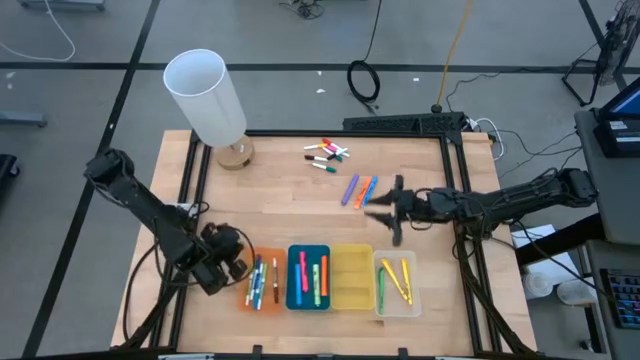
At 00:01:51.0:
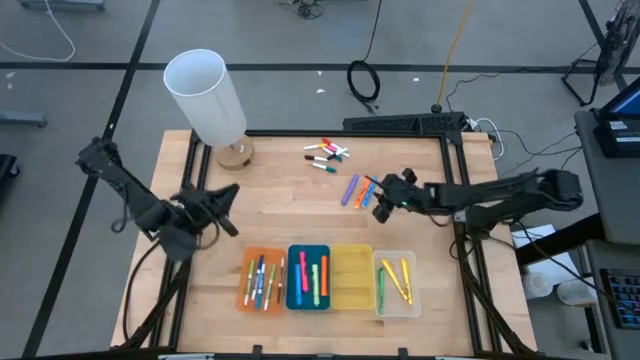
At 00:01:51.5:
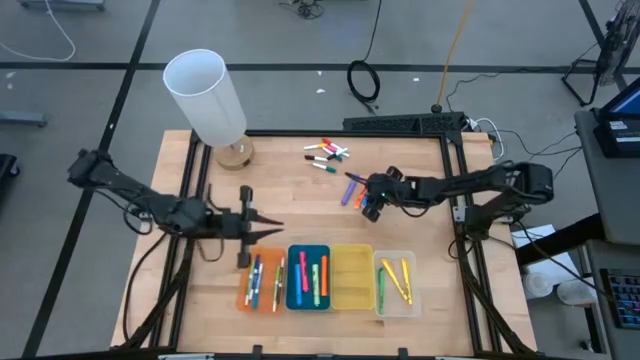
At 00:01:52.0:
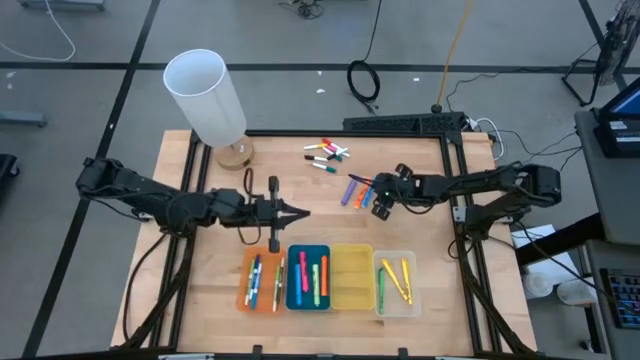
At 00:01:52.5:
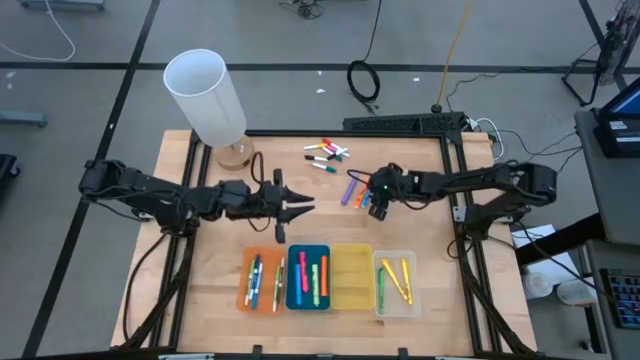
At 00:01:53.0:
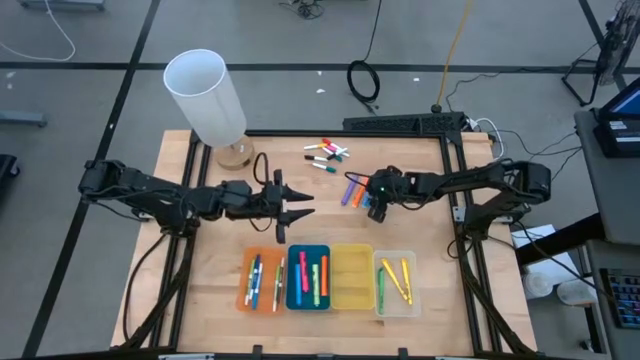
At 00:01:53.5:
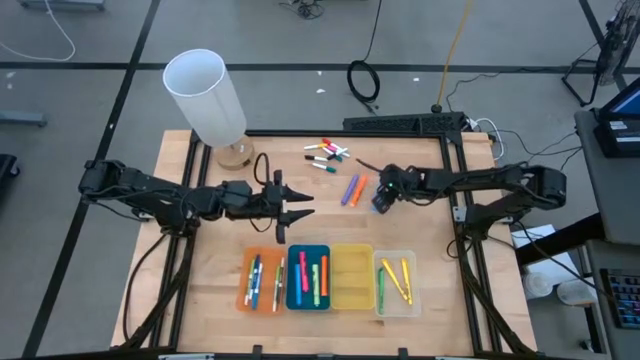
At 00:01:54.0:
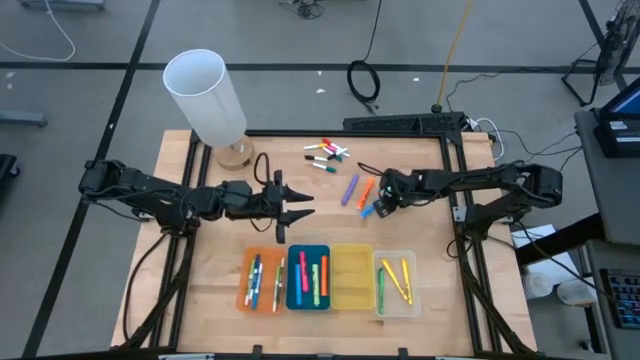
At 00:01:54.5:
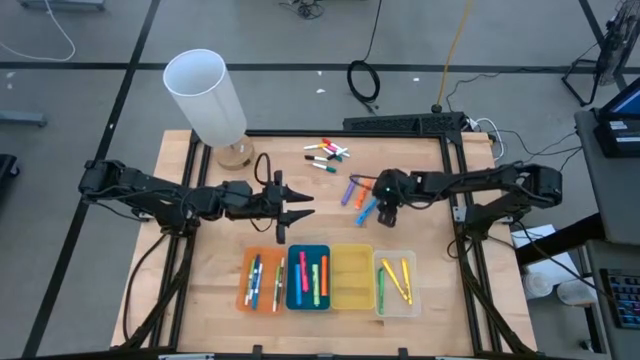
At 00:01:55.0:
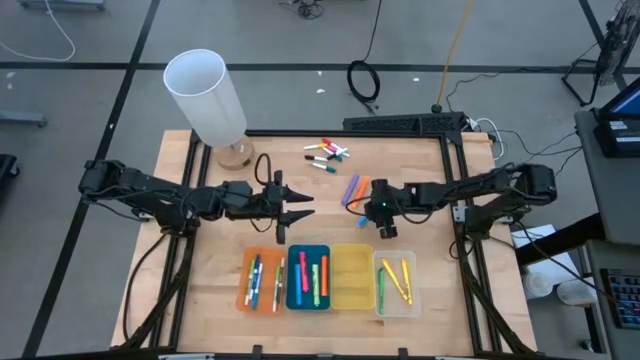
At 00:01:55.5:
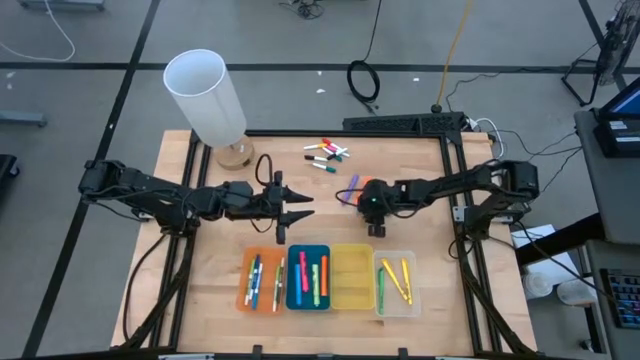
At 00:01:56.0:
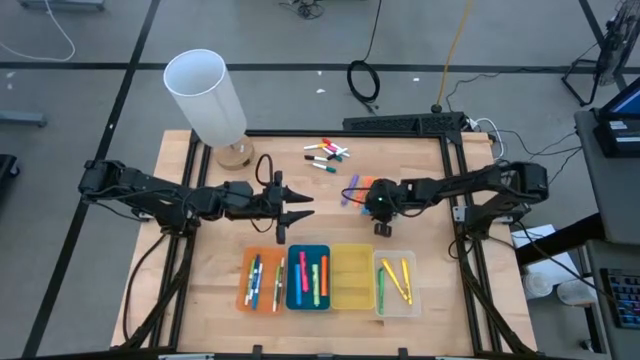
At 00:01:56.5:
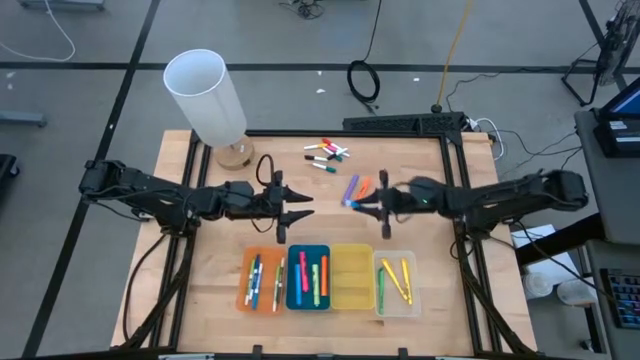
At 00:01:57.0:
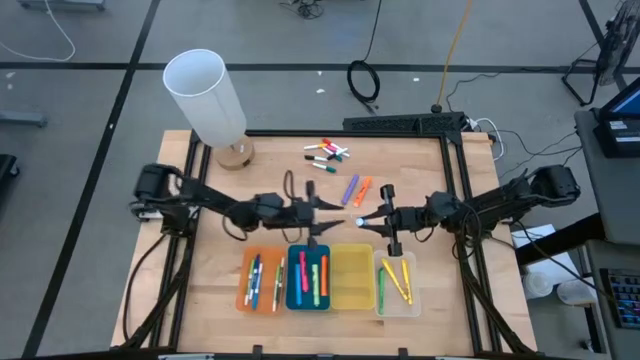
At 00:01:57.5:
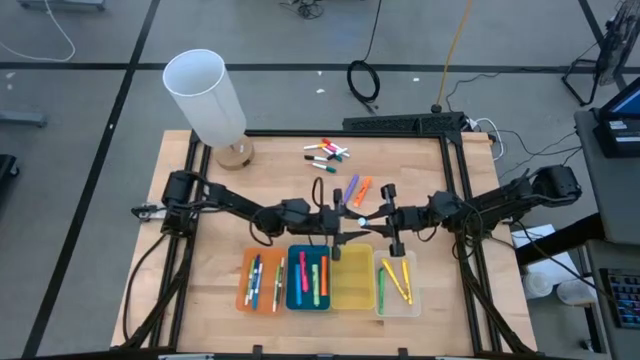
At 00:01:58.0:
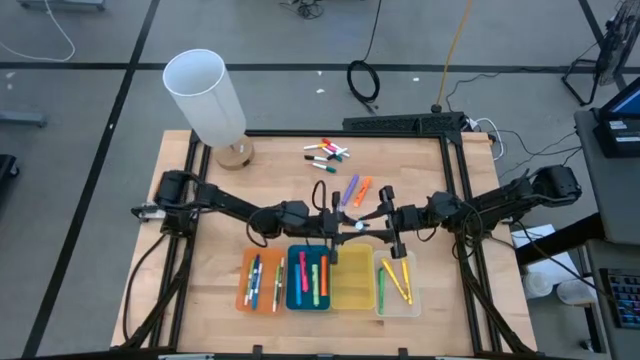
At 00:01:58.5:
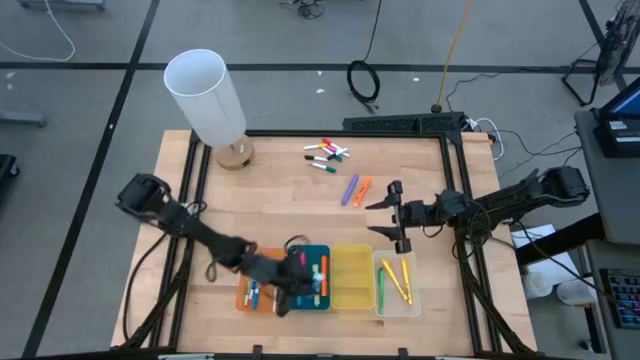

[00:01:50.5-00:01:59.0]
Task: Pick & Place Markers
Put the blue highlighter pen into the blue bin

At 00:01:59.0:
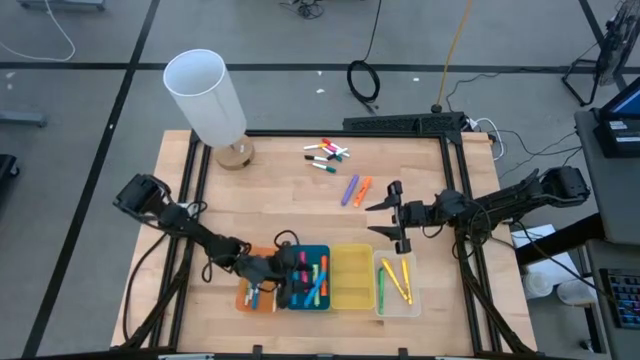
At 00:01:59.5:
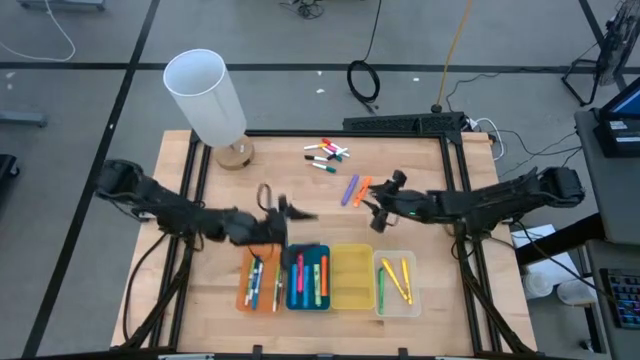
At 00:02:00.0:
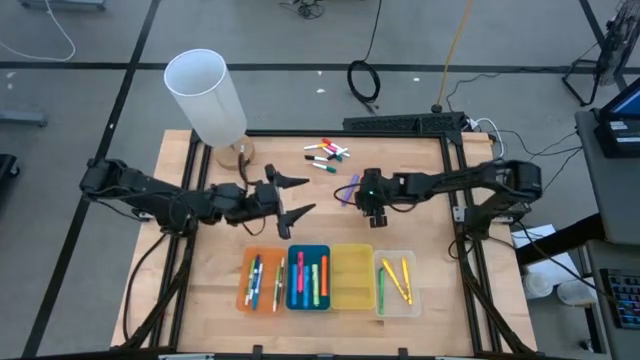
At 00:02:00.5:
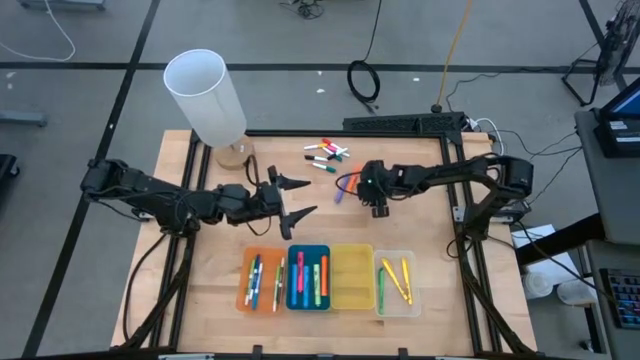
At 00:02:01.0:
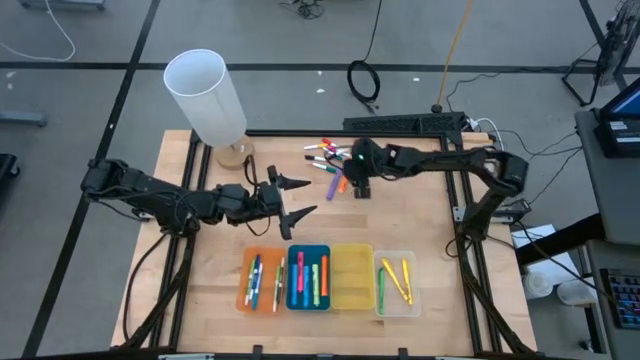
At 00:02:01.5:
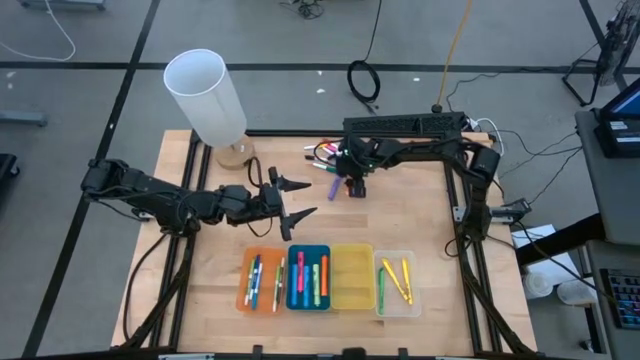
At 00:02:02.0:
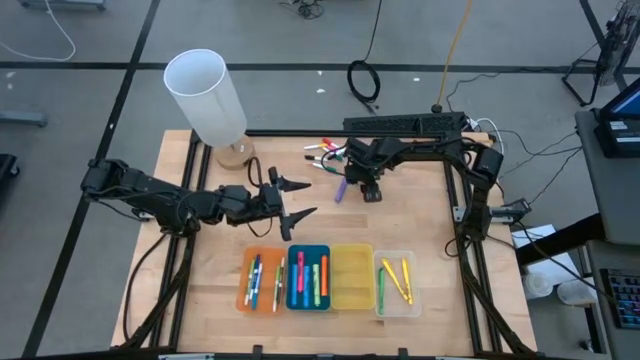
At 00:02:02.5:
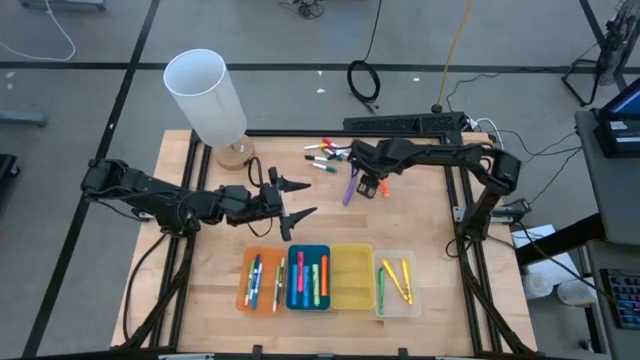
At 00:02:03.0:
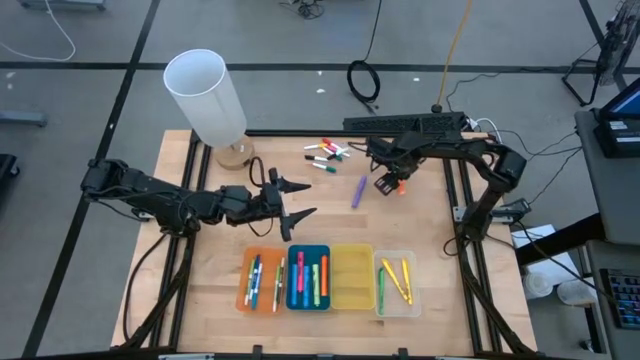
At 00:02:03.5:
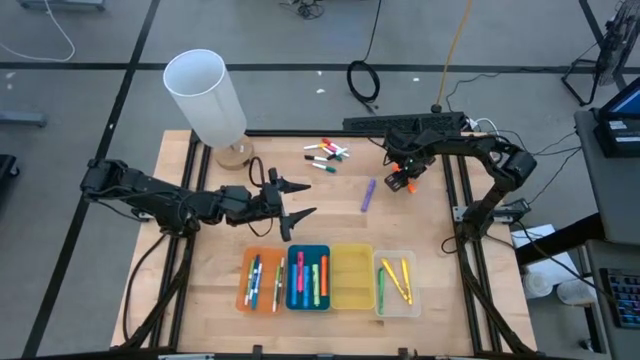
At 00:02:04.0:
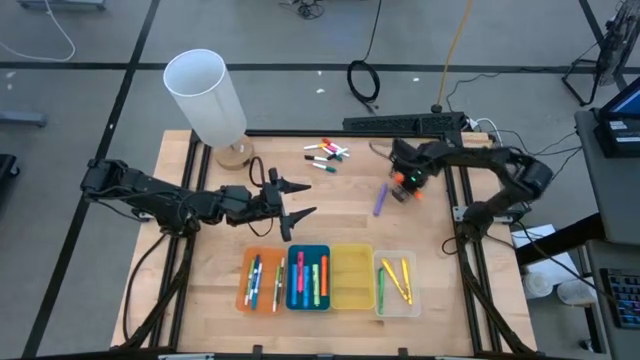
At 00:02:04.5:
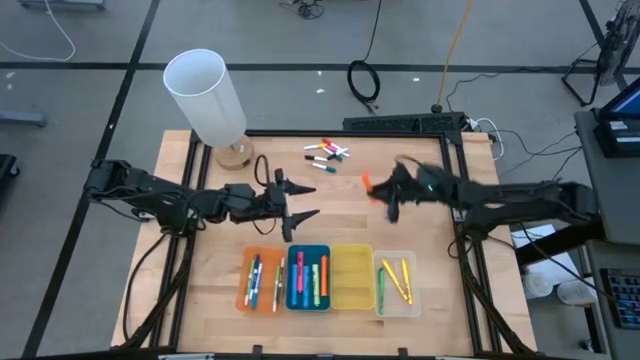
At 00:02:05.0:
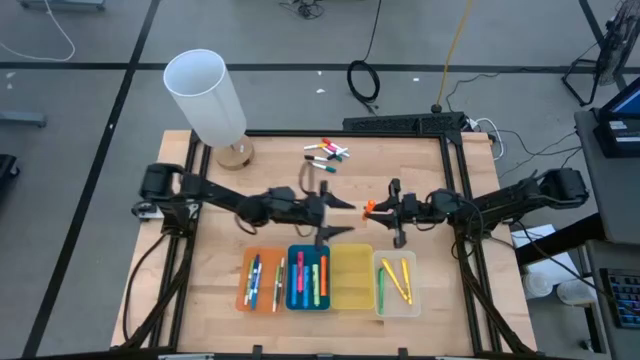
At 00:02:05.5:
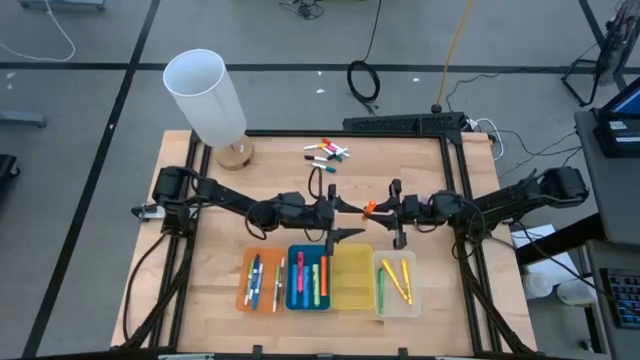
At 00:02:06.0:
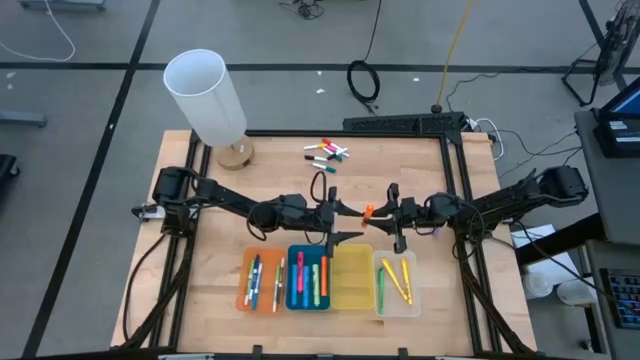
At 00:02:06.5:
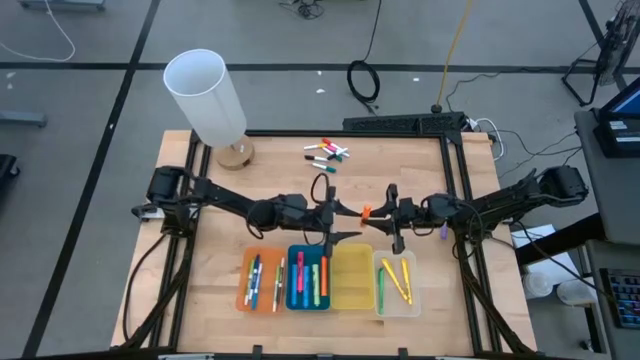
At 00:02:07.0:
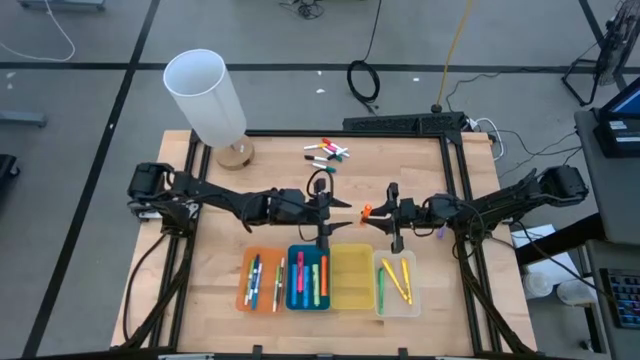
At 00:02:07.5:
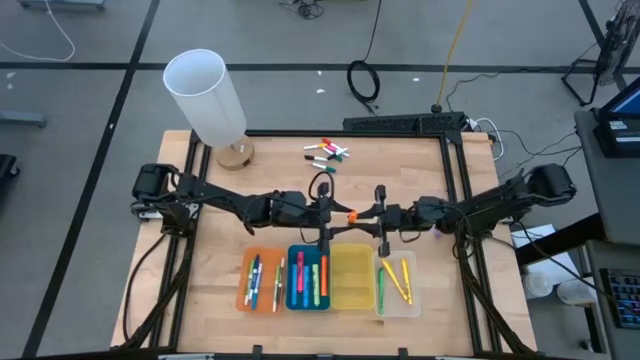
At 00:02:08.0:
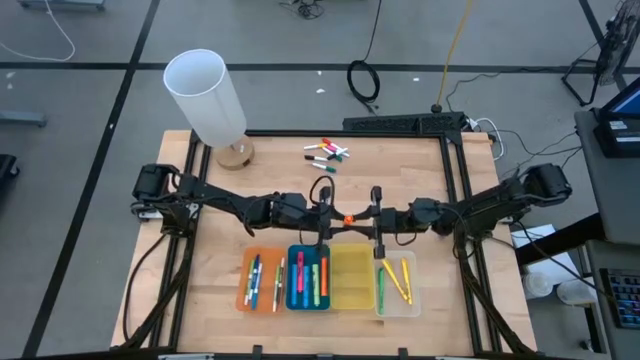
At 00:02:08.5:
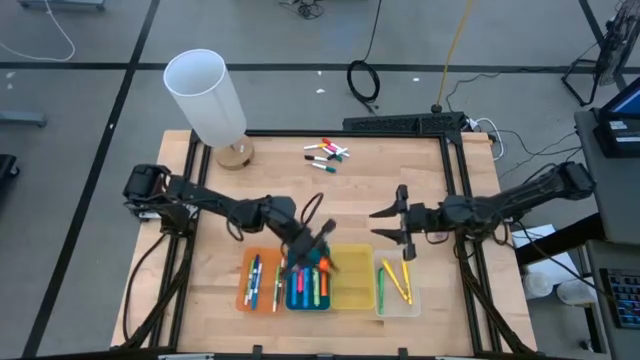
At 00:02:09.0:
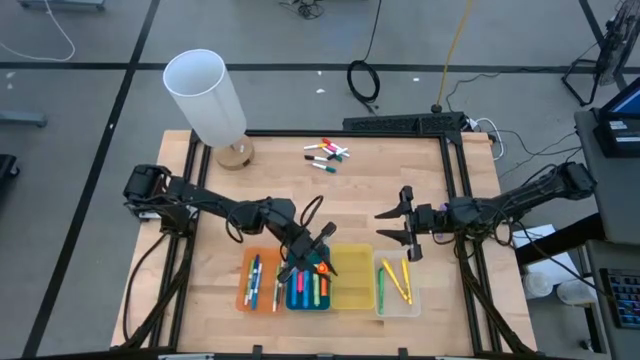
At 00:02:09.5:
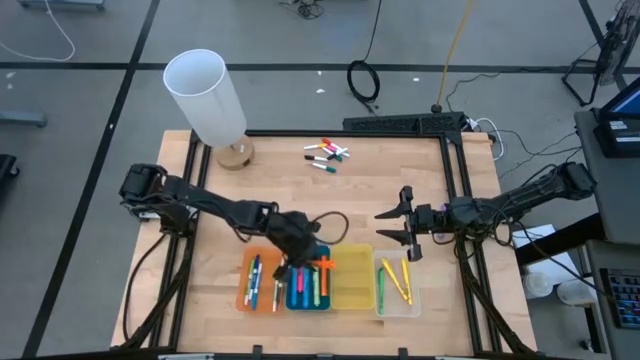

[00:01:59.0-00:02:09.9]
Put the orange highlighter pen into the blue bin

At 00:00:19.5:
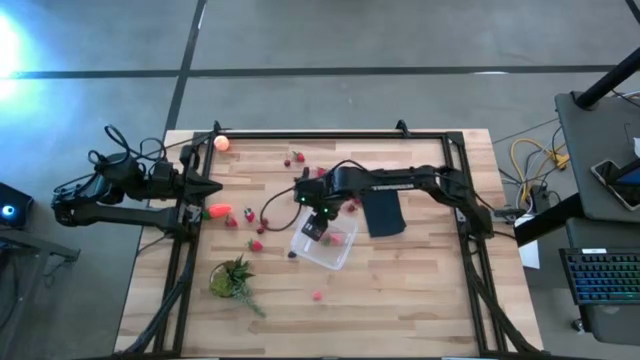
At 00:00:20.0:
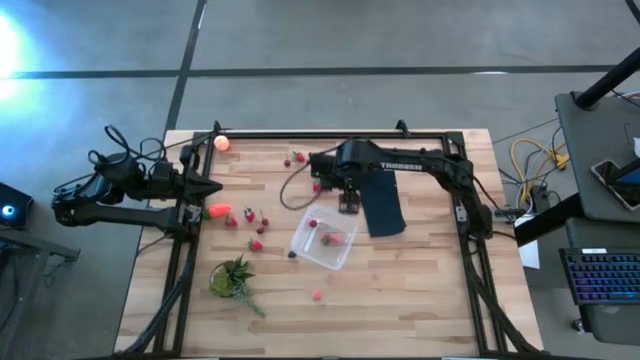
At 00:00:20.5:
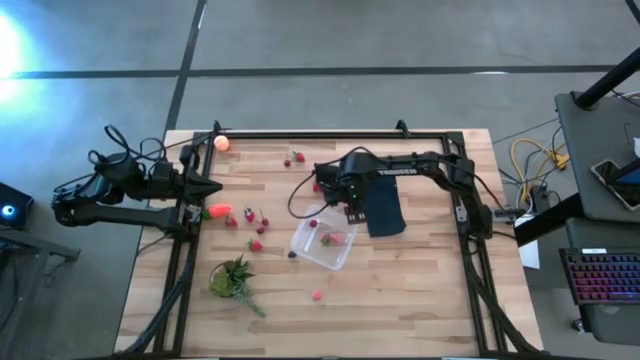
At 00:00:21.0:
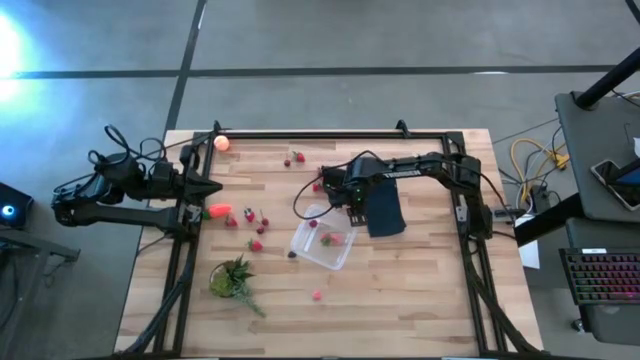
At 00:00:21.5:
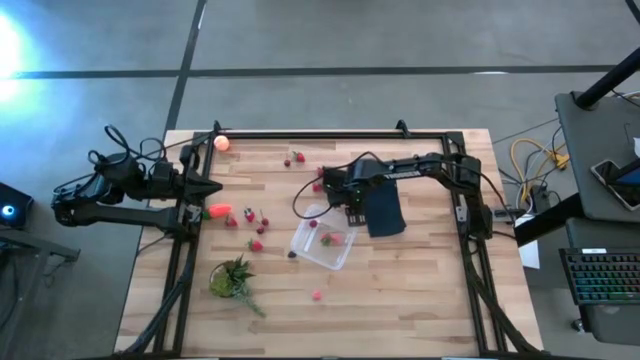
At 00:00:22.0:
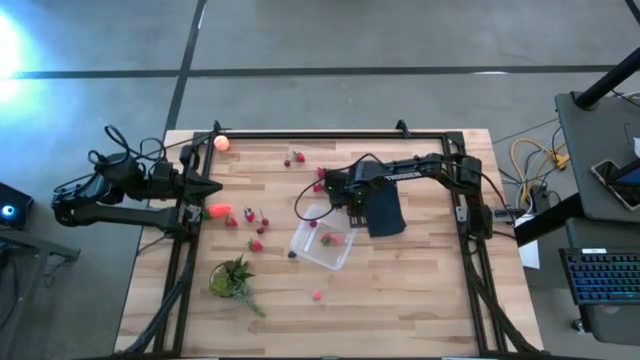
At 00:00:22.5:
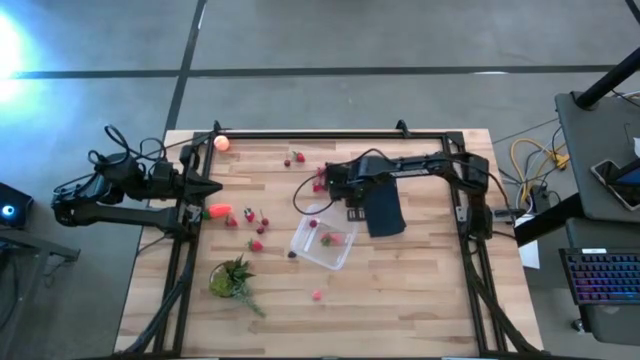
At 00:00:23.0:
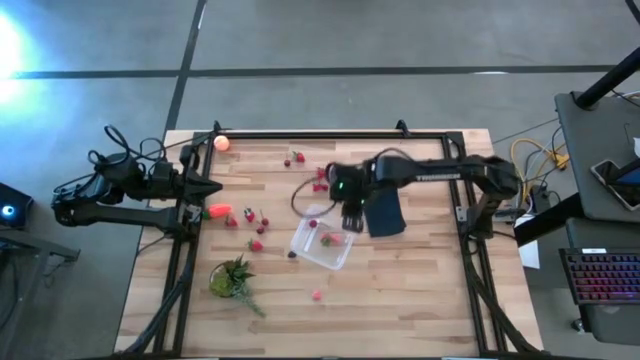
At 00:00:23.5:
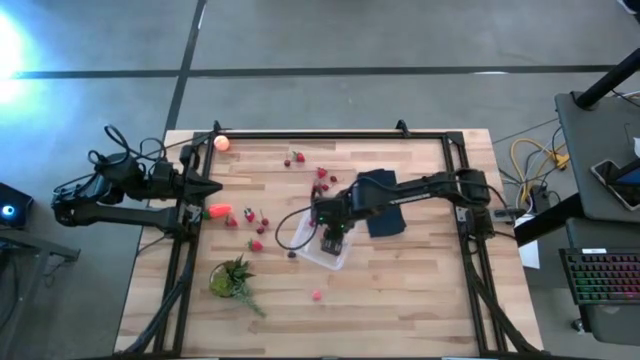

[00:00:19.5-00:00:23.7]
Task: Pick and placing Produce into tupperware
Put the red cherry into the transparent bin
